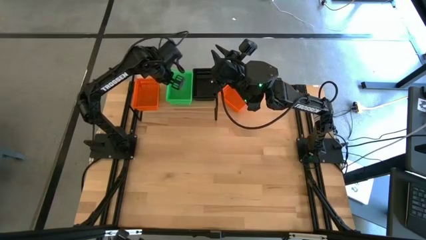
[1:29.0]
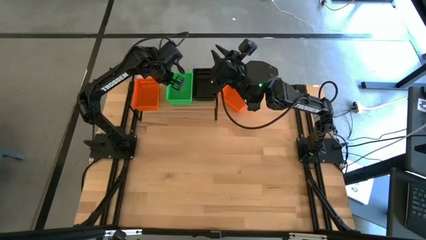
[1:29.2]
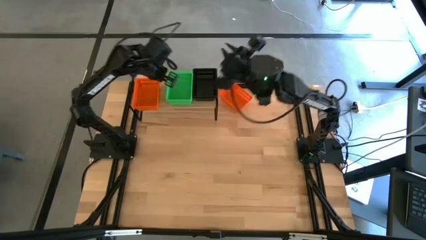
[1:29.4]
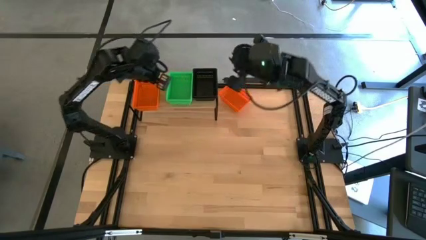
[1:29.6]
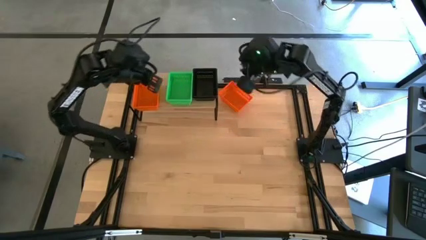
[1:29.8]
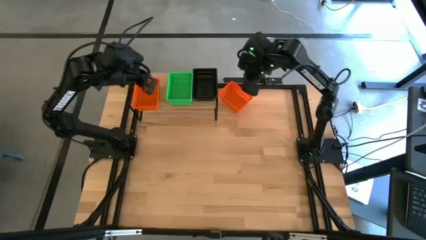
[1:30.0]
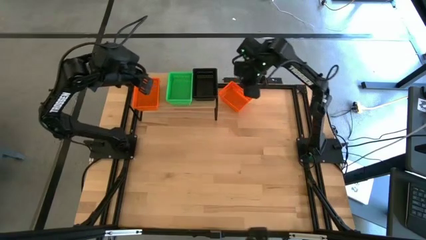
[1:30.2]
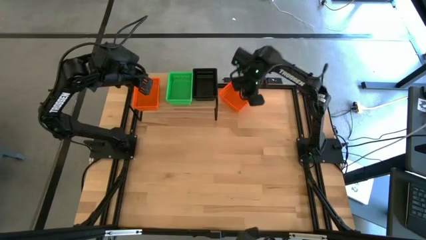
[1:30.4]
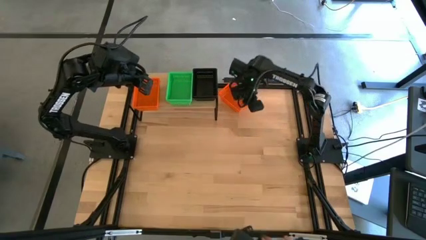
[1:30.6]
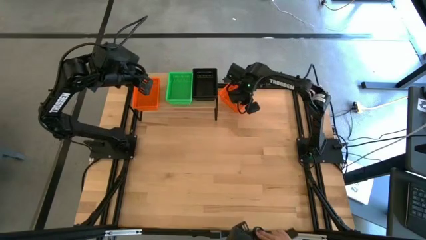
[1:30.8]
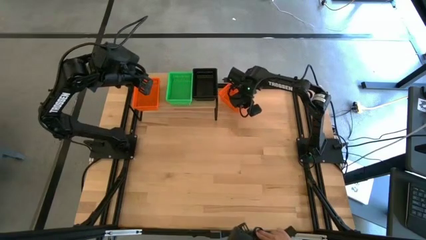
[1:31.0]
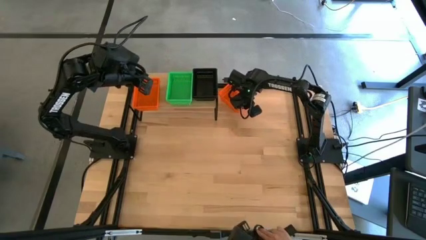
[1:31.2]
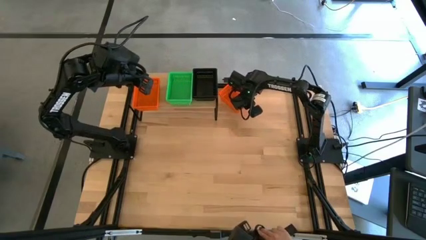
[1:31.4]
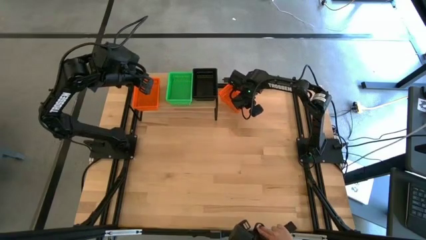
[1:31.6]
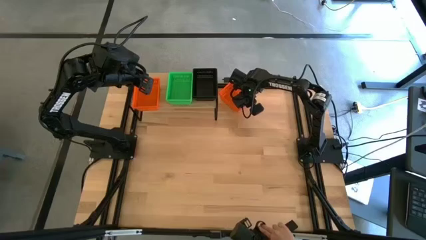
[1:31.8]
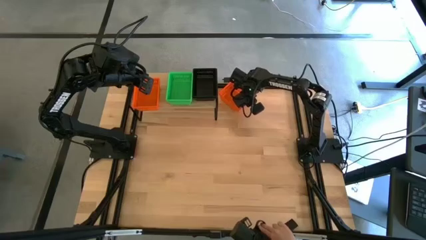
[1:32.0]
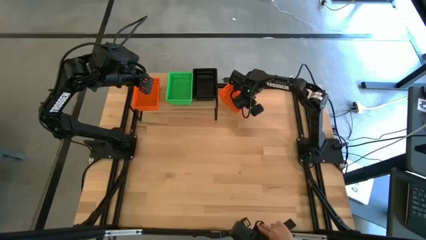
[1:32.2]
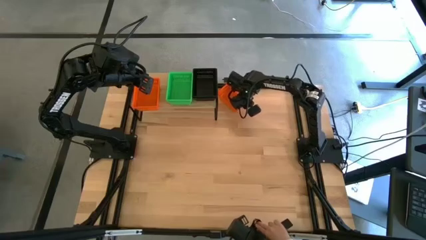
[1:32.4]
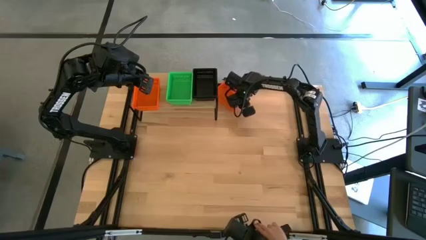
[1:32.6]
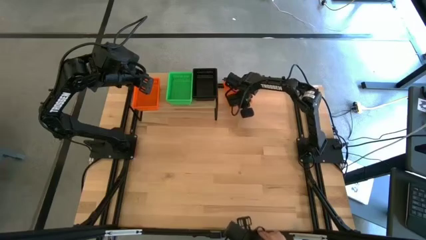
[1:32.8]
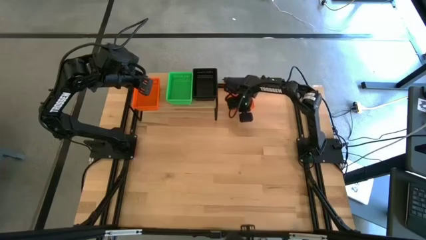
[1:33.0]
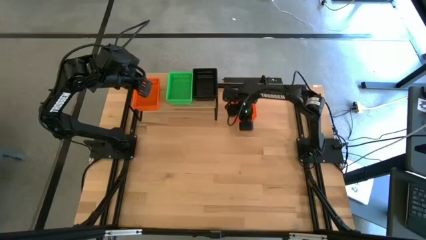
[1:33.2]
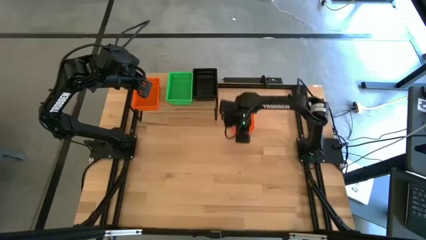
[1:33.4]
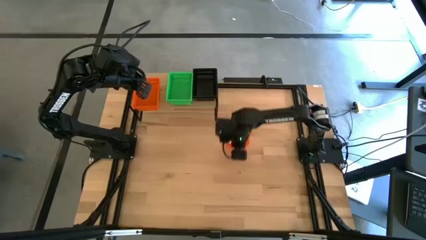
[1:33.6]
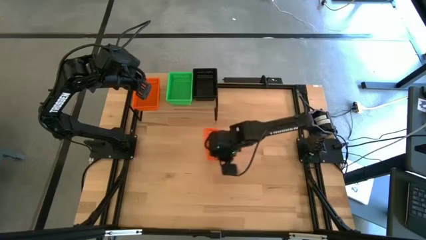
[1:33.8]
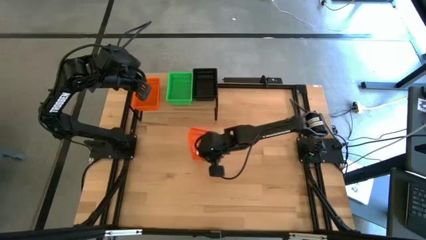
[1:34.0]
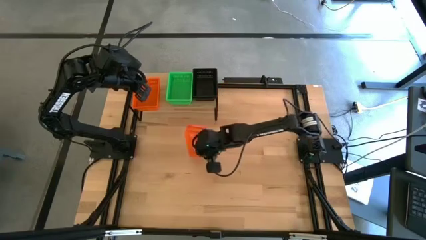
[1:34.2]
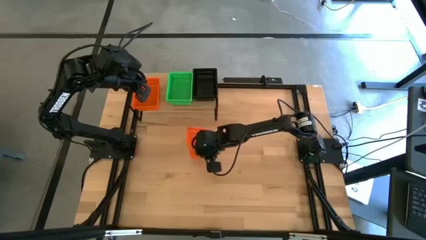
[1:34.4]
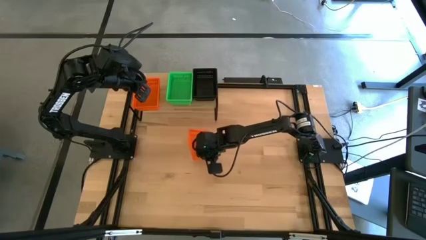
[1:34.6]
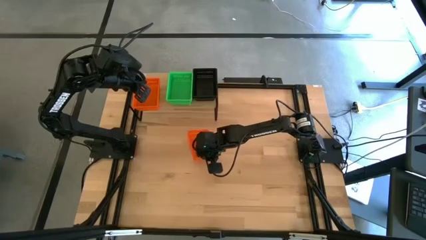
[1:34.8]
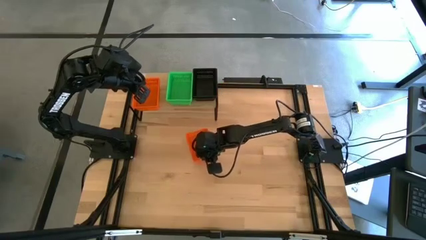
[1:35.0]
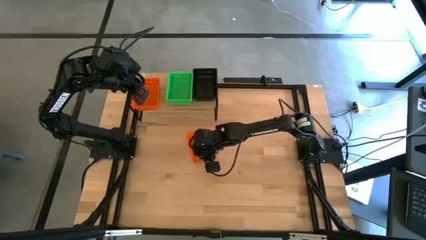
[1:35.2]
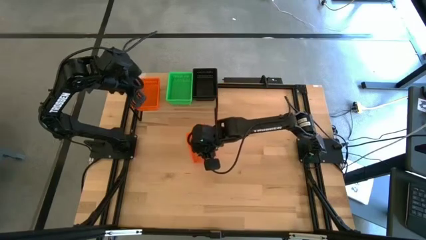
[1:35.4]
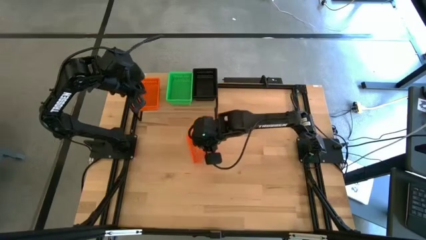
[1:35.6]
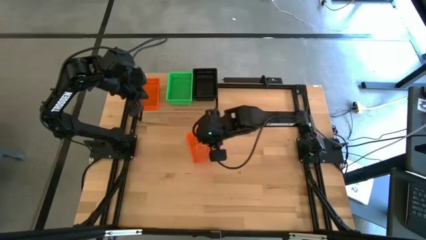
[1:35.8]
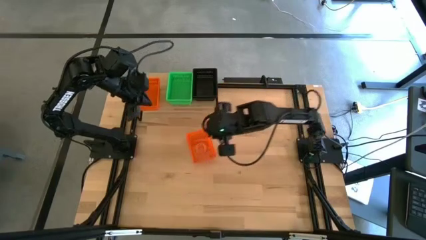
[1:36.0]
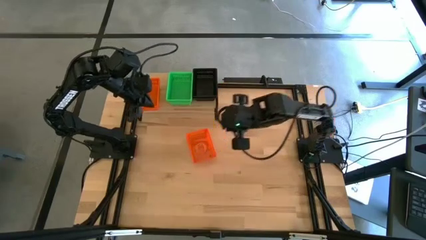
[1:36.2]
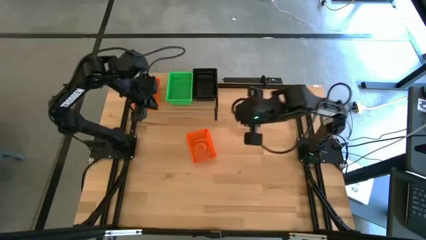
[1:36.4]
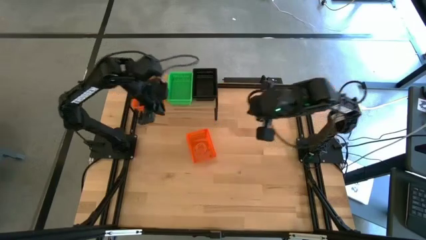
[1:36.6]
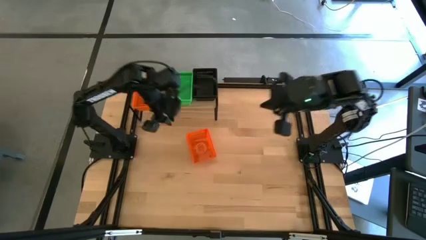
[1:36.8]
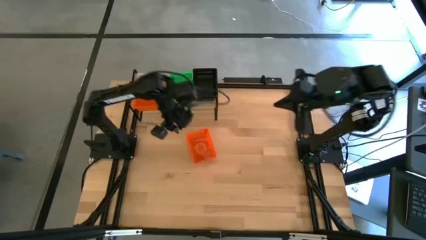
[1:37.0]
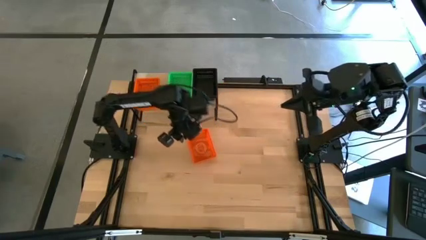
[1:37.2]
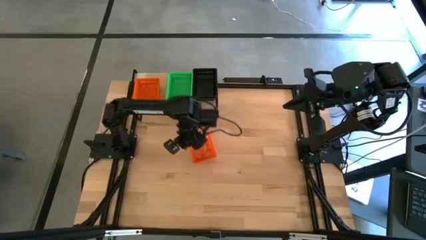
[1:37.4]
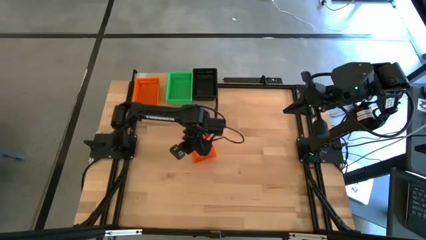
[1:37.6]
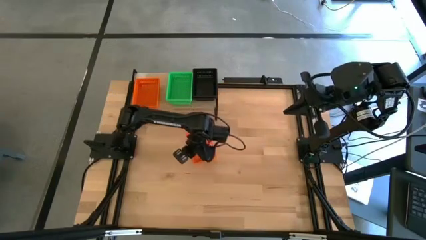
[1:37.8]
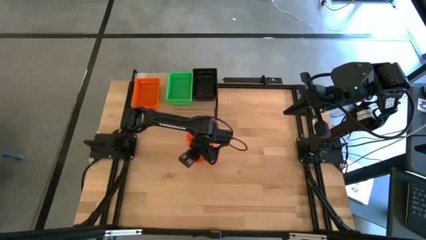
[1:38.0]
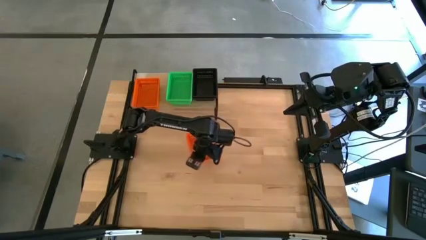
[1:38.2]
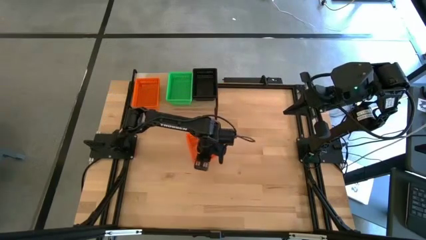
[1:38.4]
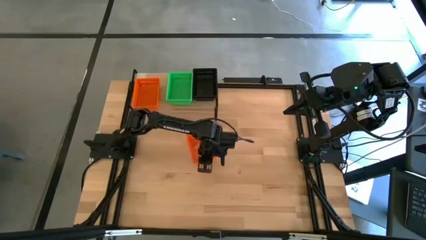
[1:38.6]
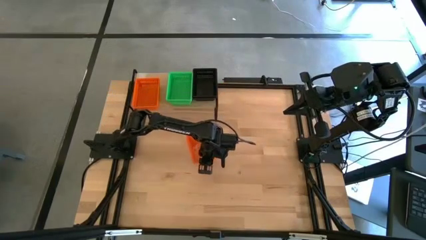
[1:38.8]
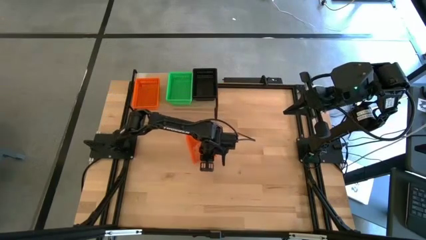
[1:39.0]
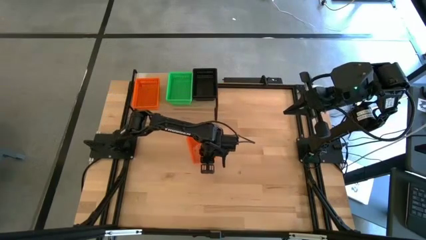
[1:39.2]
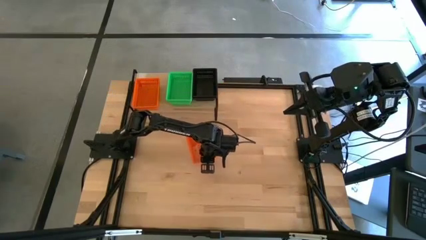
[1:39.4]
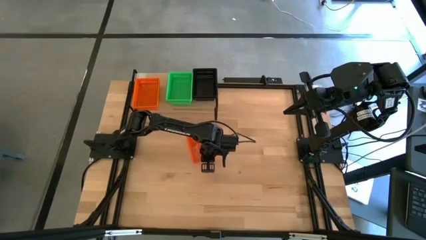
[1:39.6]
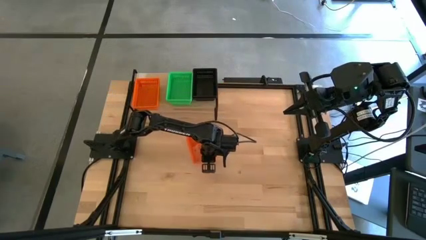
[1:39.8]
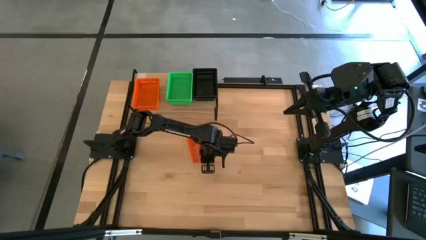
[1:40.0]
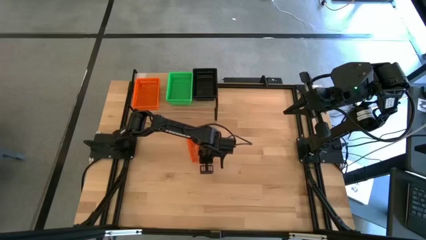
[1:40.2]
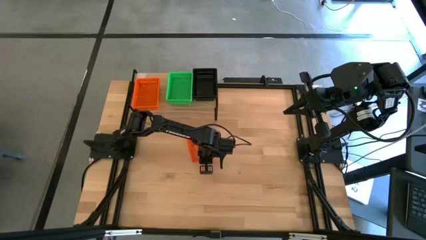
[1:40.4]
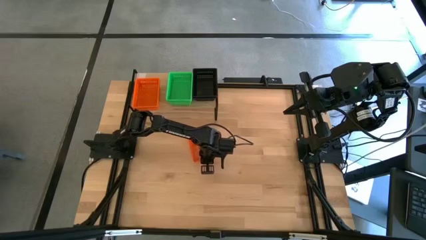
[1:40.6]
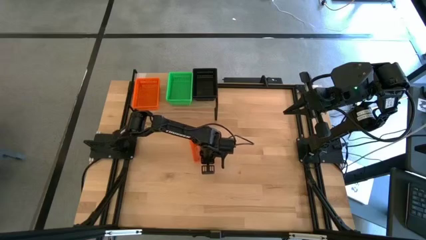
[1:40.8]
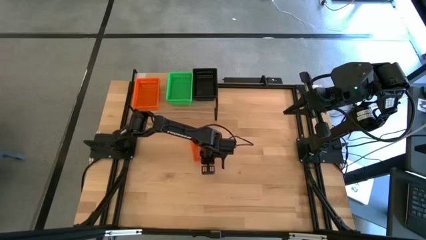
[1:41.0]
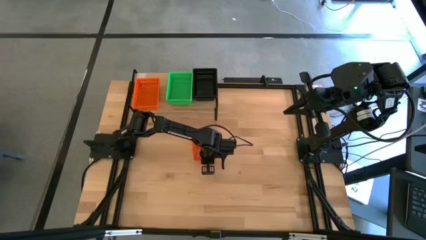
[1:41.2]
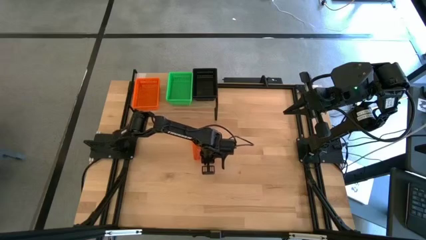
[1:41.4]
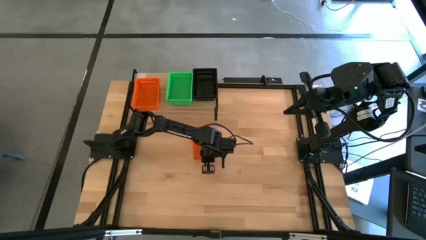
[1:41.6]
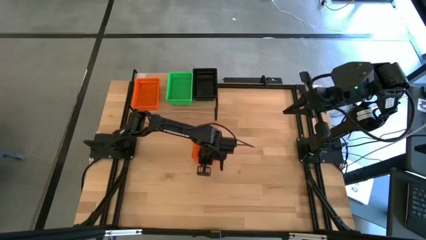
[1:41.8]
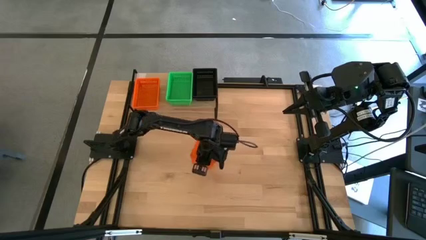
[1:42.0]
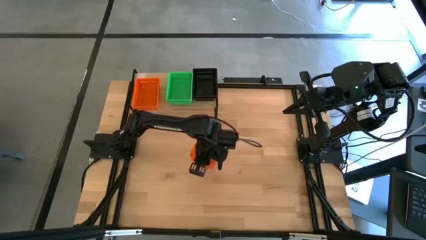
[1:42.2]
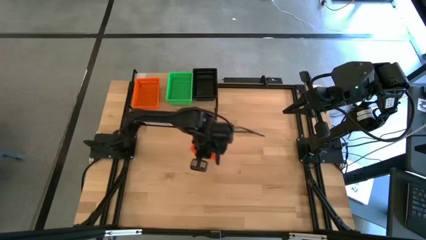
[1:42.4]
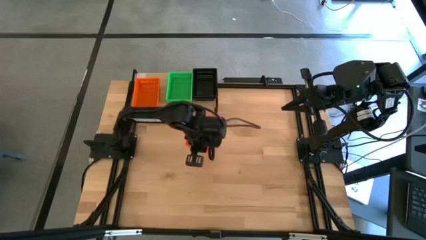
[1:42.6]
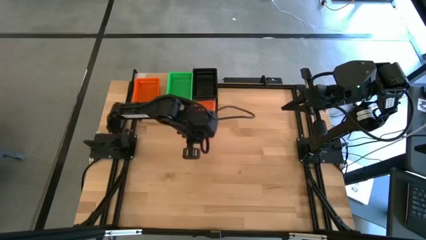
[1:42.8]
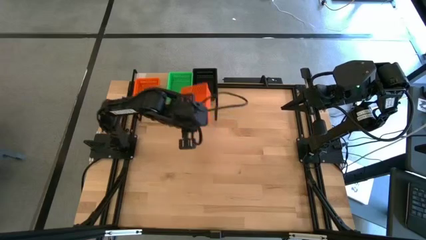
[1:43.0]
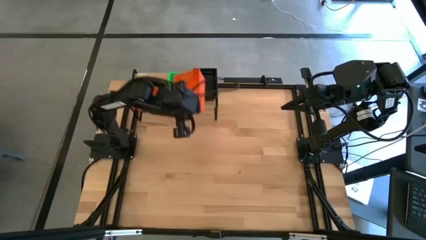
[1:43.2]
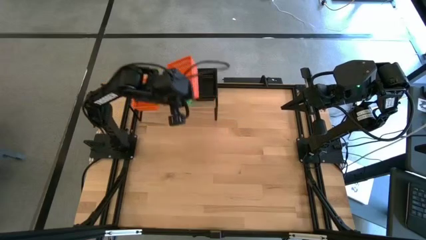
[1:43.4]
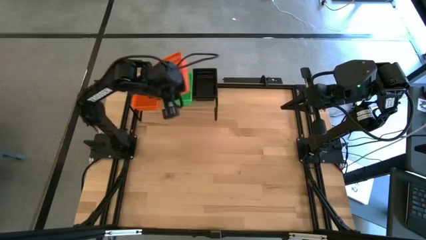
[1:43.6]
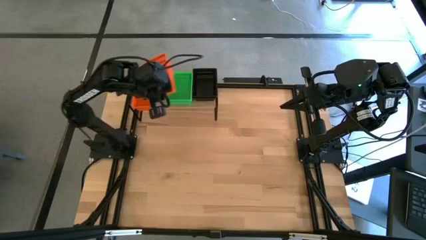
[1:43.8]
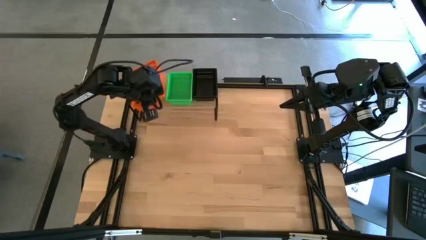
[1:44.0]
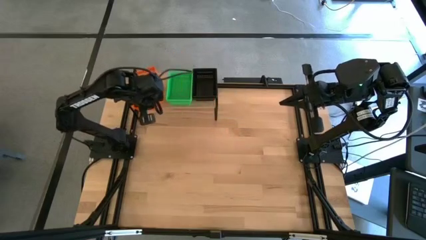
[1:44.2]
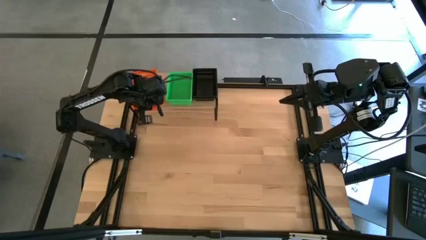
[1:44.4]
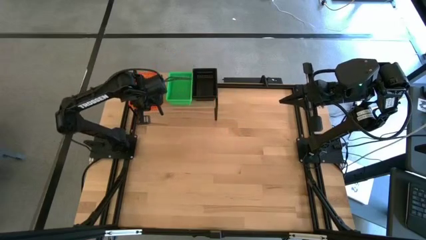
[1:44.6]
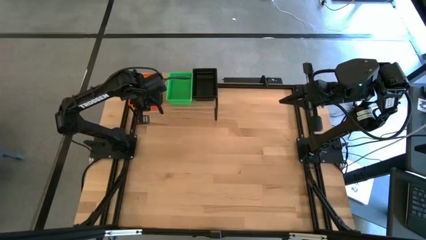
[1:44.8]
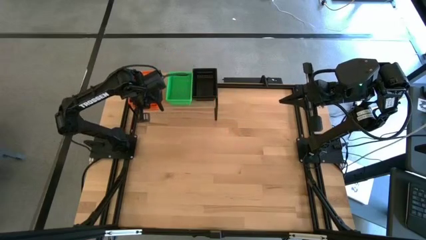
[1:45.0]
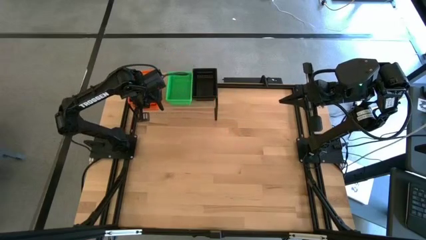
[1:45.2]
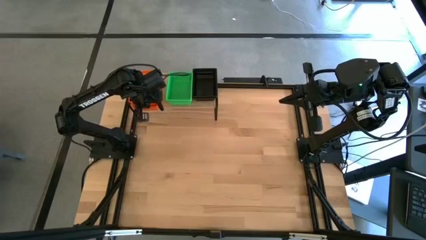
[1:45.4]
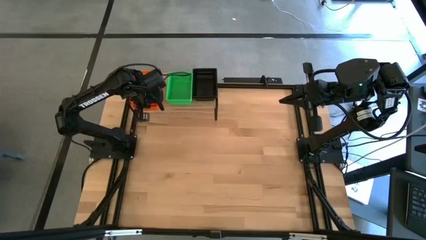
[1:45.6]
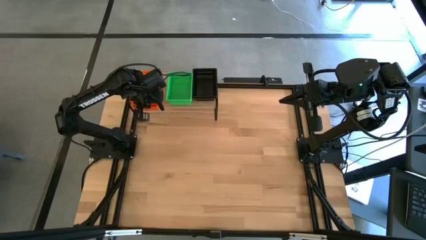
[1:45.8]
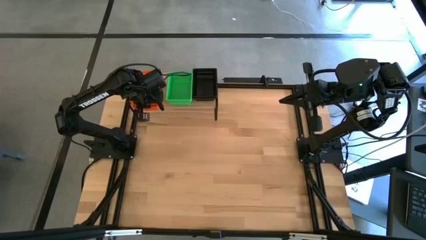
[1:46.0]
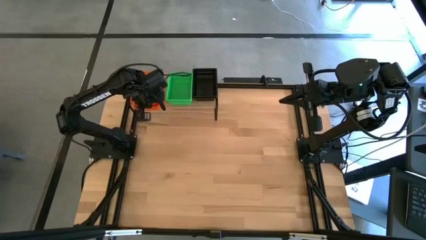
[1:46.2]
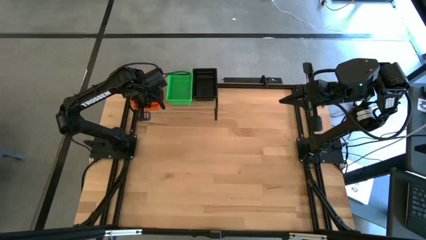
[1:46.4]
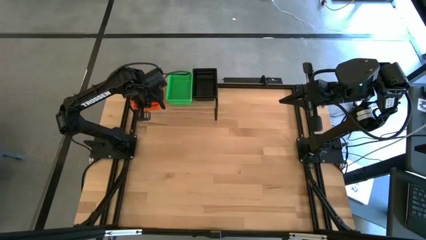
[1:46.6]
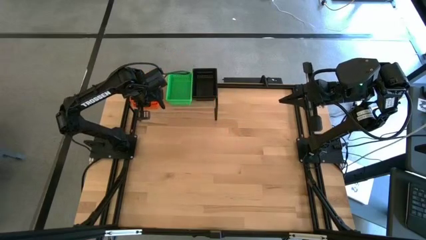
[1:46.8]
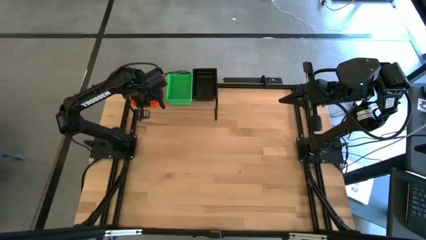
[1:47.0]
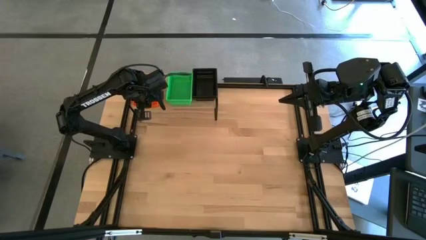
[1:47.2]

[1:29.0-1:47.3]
Task: Stack baskets on shelf by color
Stack the orange bin on the orange bins on the shelf
